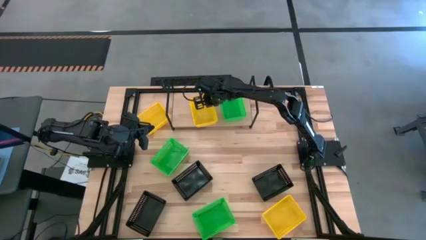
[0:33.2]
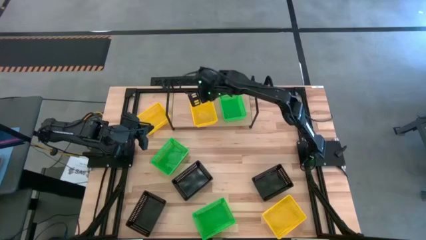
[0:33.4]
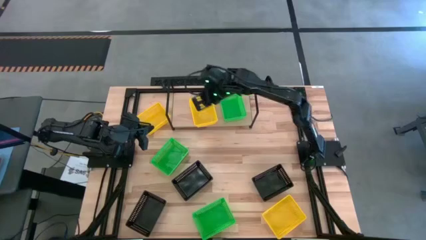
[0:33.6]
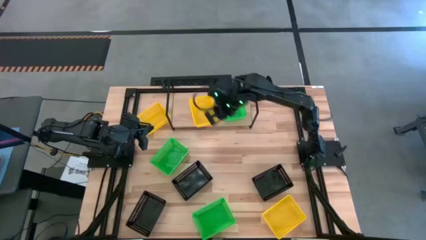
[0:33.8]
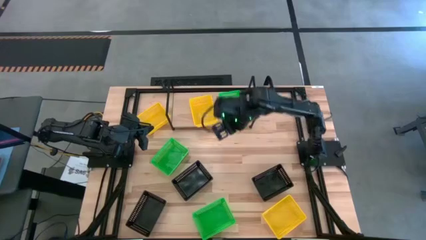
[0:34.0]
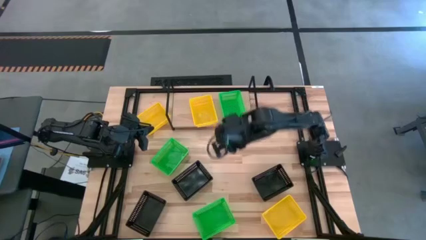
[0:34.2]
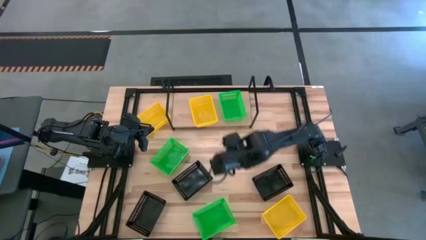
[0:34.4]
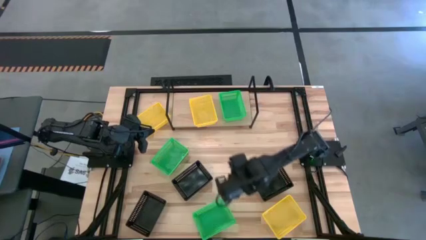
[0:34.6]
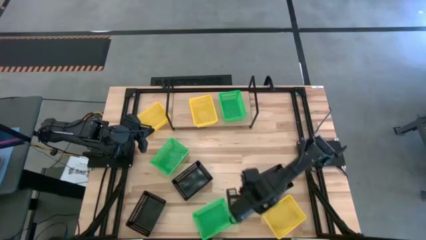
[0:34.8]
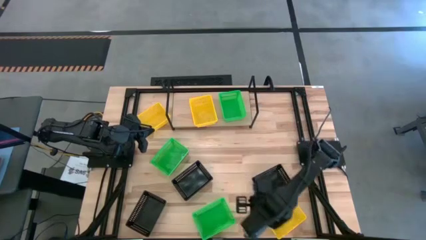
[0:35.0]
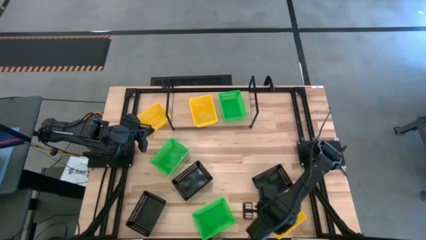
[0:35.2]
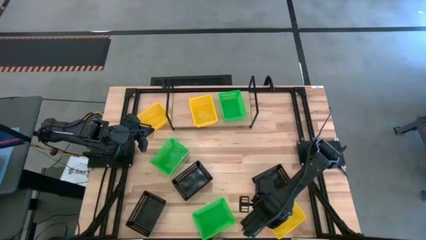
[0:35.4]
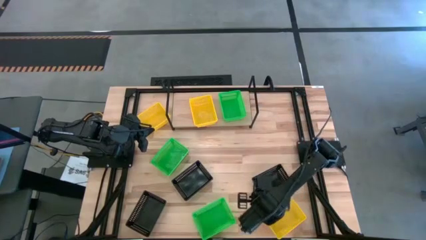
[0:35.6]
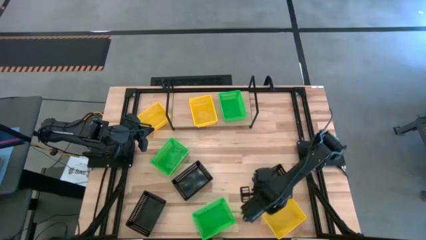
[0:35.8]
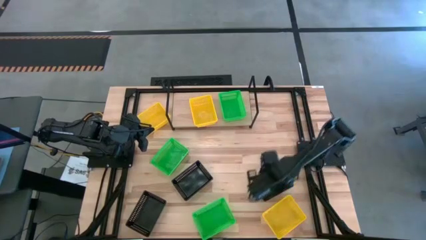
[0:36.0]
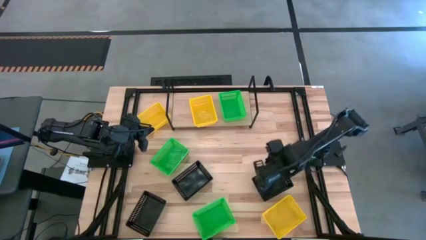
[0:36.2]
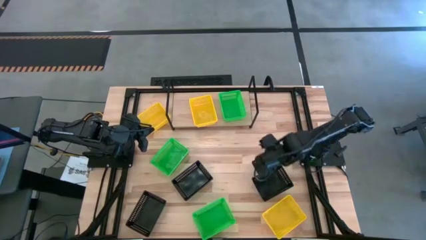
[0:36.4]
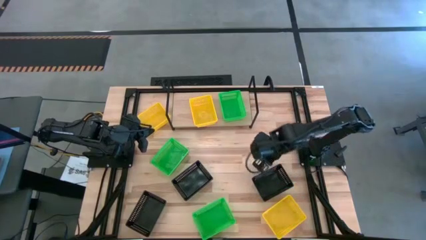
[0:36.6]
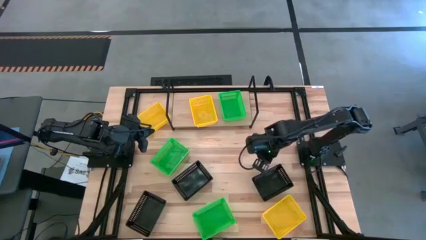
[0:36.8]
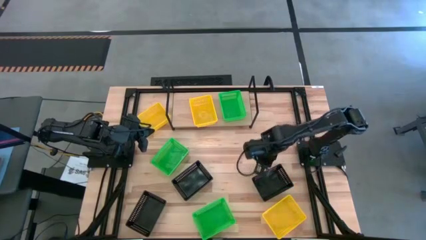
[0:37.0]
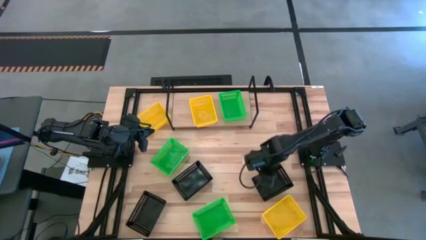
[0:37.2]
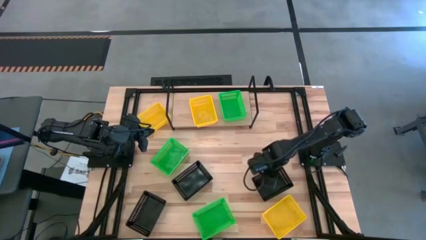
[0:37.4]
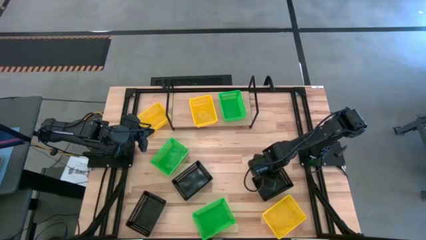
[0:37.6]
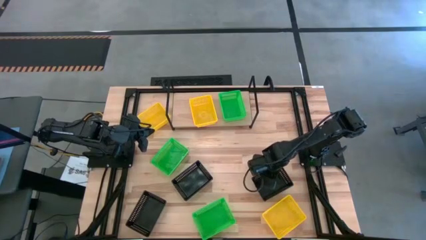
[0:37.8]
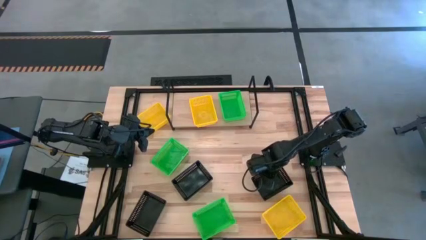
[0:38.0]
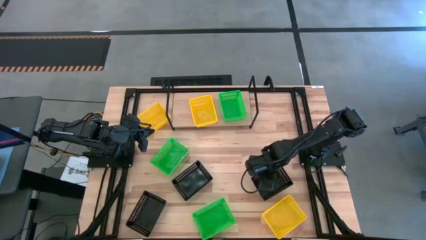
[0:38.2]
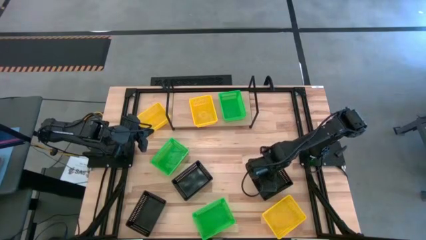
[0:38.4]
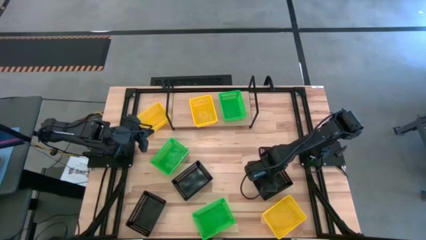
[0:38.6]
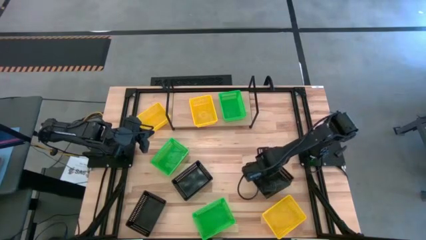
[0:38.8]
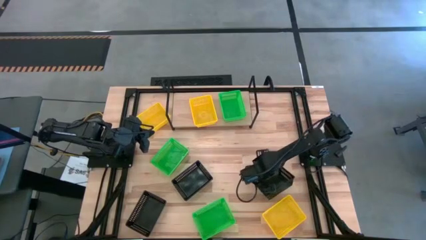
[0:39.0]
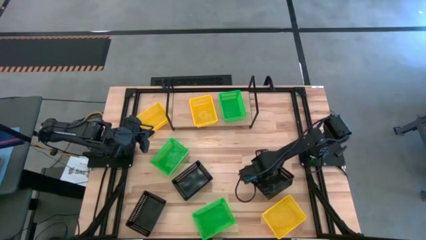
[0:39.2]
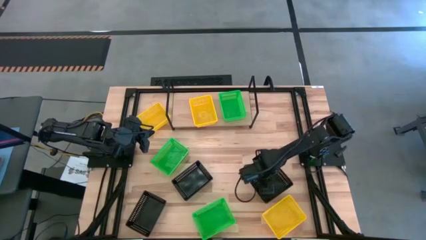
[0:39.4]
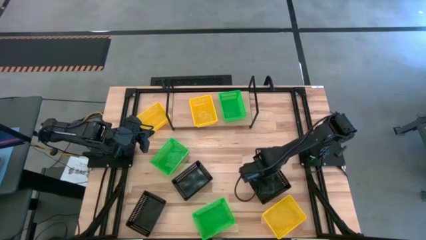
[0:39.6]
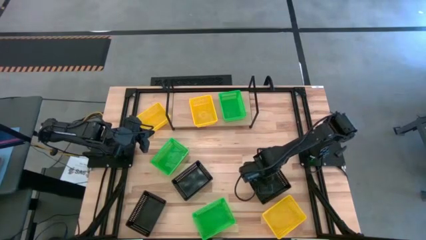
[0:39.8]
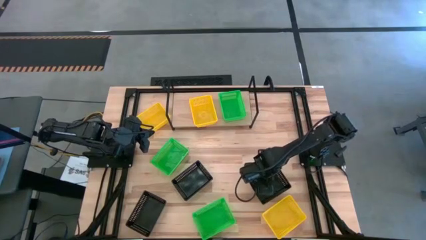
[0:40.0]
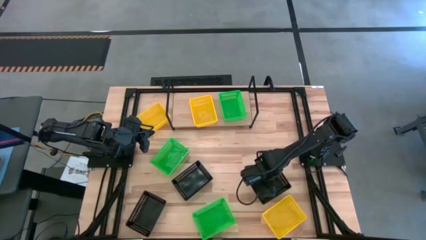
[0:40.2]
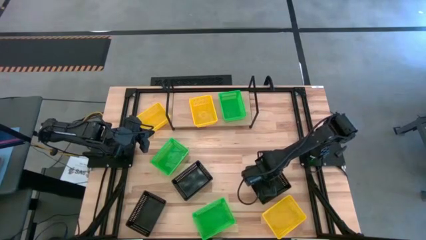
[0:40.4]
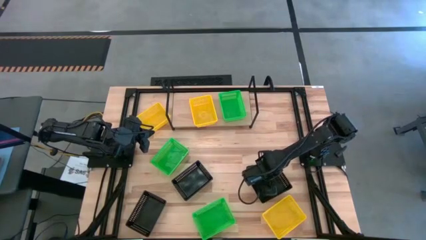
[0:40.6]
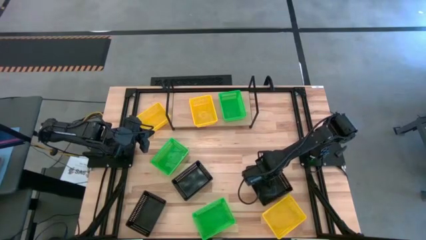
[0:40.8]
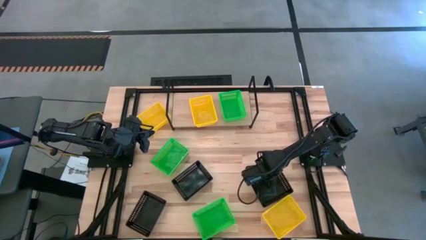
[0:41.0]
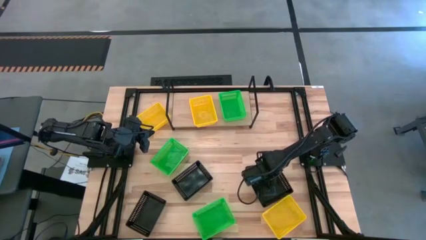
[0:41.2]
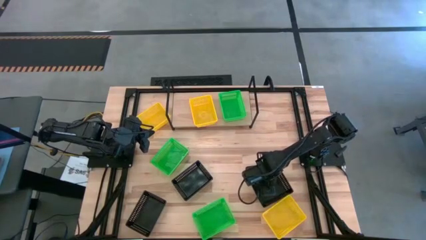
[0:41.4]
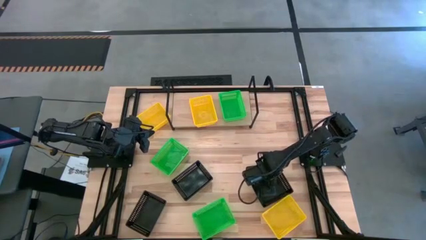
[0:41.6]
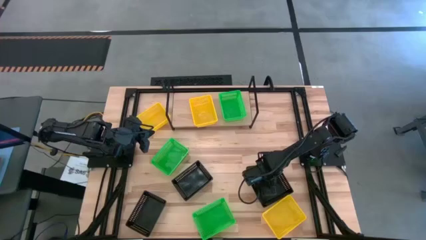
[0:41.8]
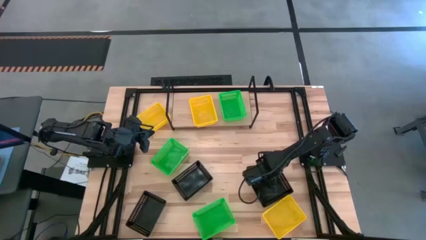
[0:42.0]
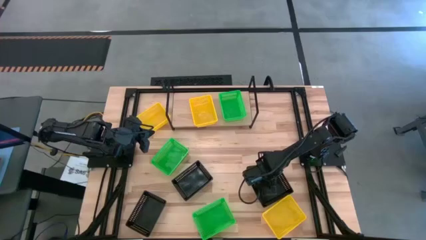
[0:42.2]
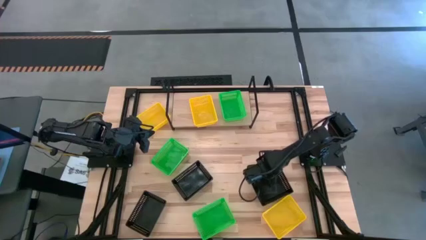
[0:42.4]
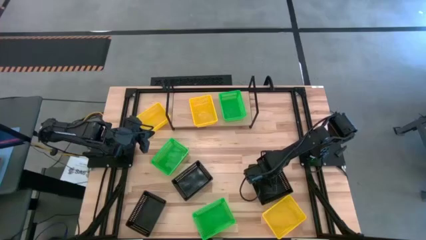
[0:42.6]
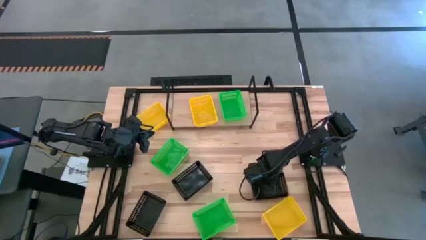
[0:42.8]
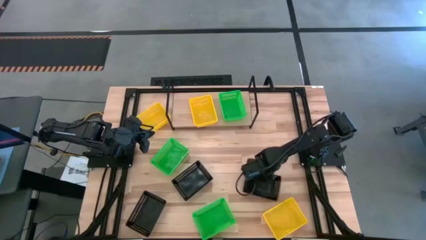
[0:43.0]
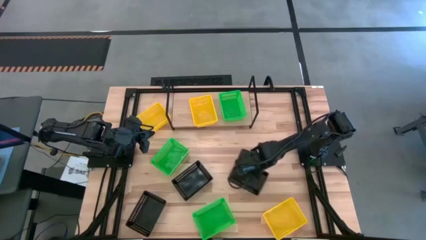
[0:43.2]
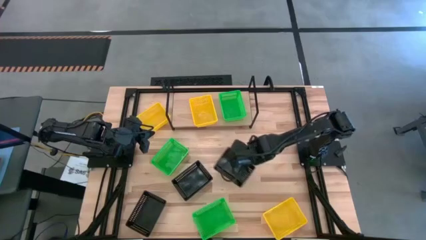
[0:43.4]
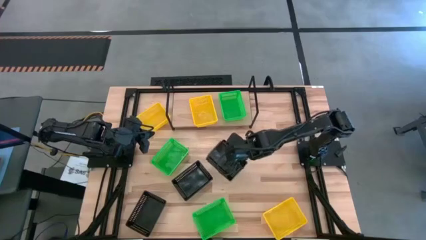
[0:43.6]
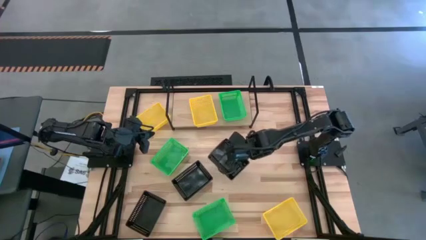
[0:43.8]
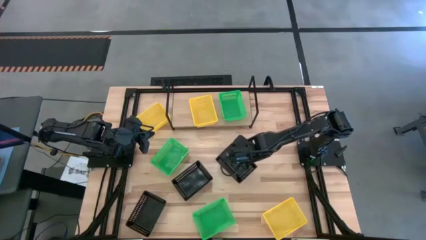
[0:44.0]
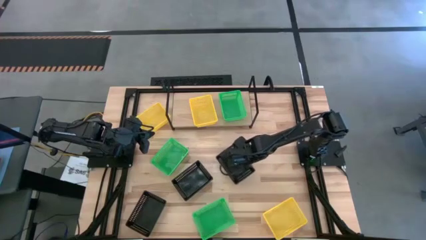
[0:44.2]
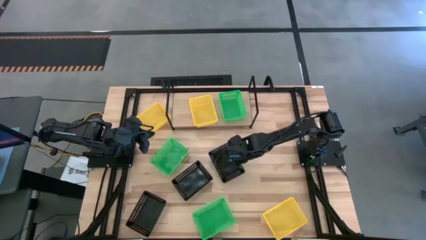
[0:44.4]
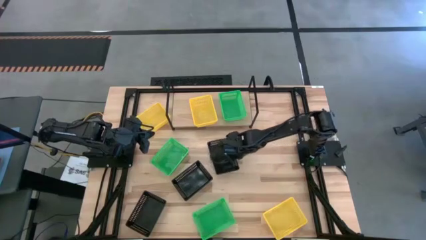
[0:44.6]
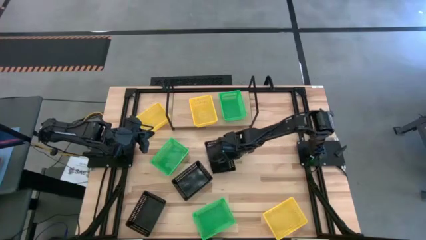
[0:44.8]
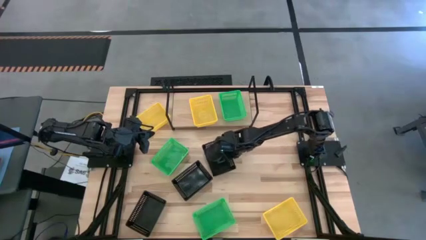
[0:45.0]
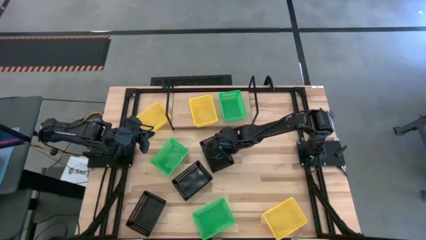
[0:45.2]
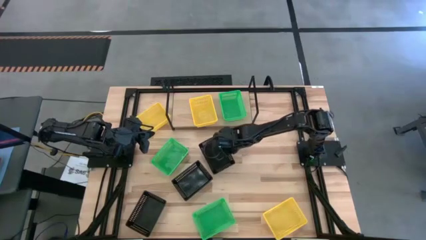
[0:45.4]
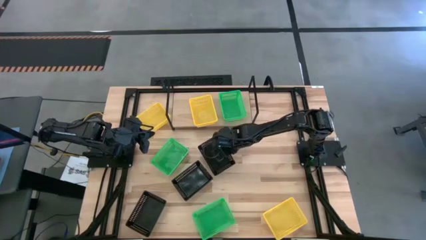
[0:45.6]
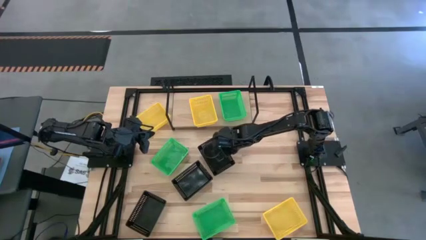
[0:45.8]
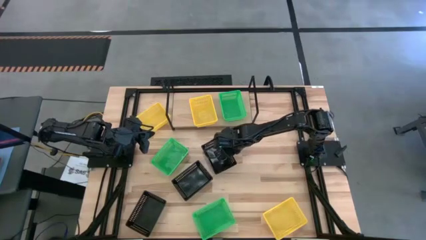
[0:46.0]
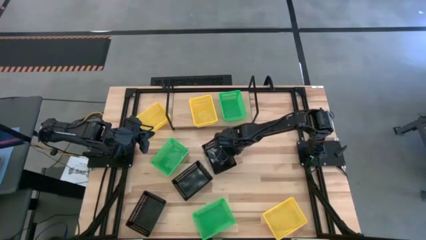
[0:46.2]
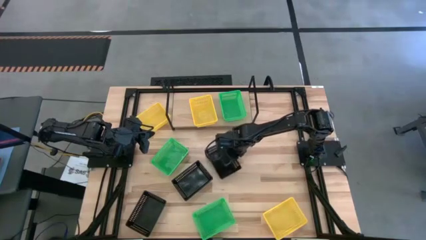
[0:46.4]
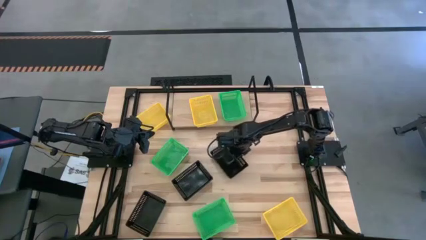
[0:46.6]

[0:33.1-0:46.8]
Task: Stack baskets on shelf by color
Move the top right black bin to the center of the table

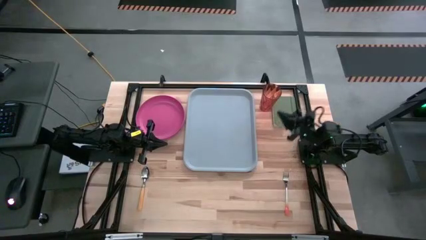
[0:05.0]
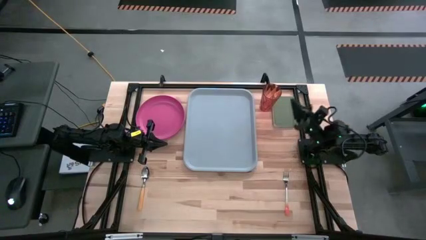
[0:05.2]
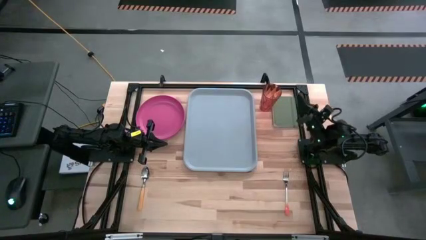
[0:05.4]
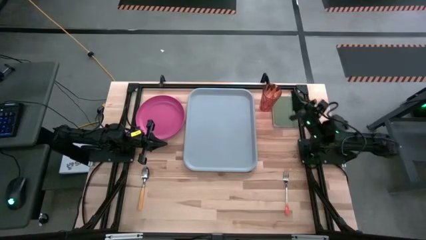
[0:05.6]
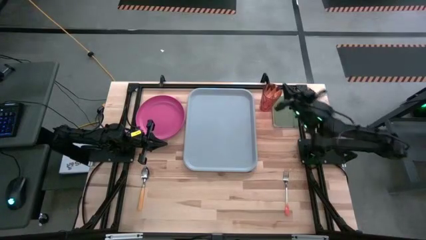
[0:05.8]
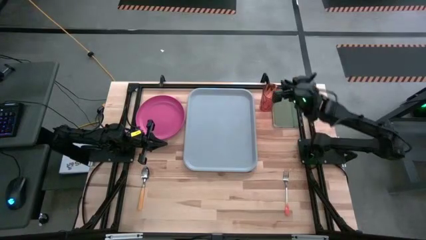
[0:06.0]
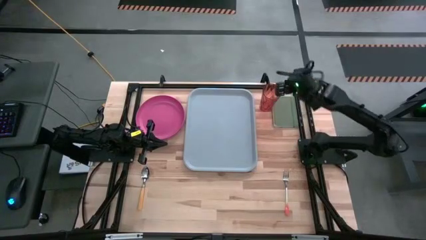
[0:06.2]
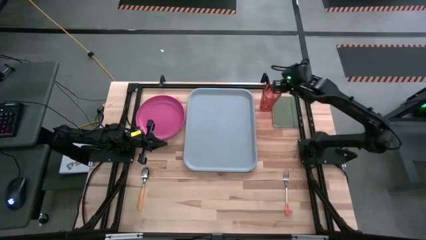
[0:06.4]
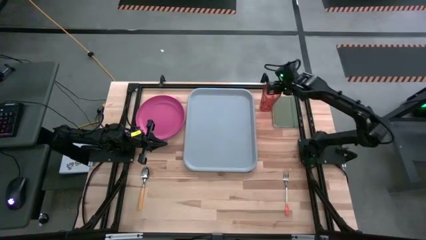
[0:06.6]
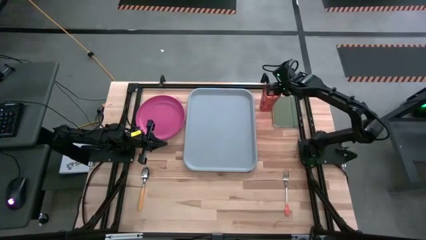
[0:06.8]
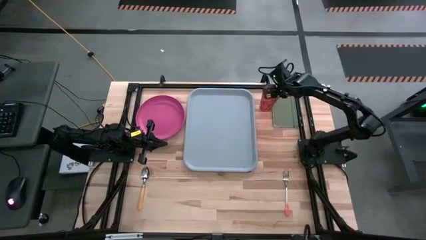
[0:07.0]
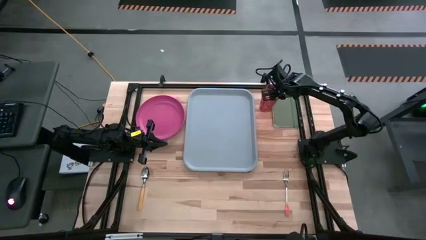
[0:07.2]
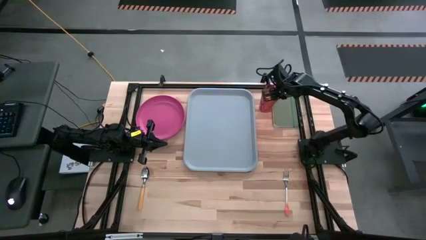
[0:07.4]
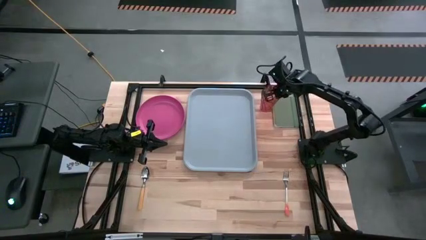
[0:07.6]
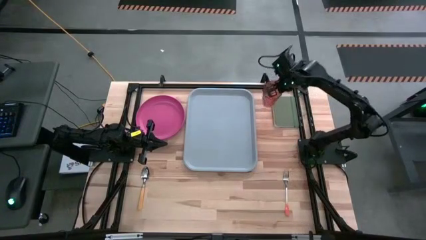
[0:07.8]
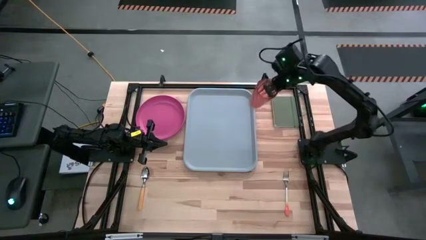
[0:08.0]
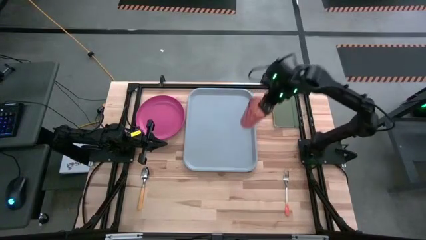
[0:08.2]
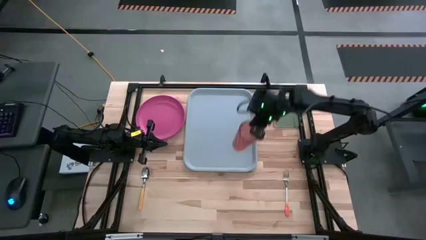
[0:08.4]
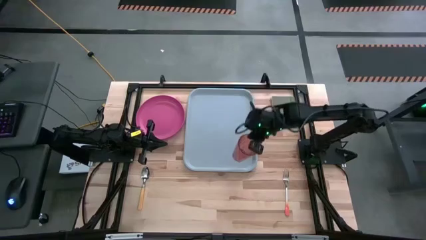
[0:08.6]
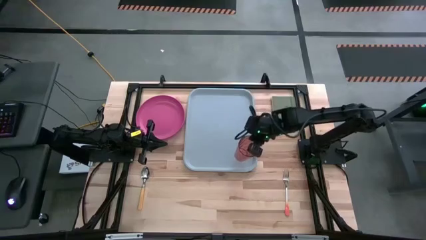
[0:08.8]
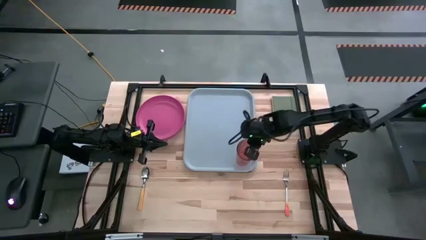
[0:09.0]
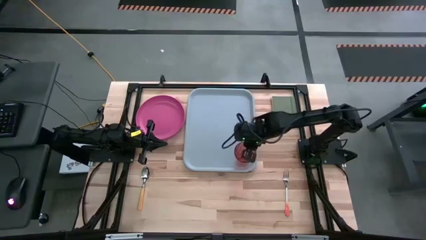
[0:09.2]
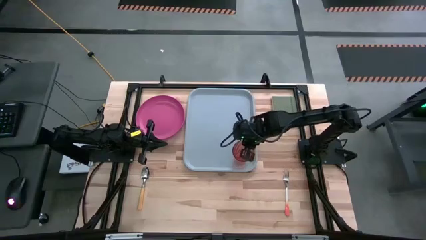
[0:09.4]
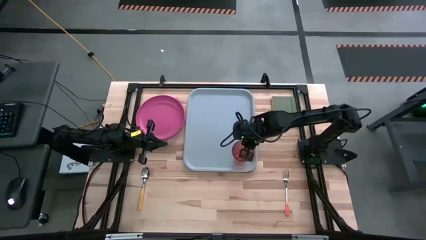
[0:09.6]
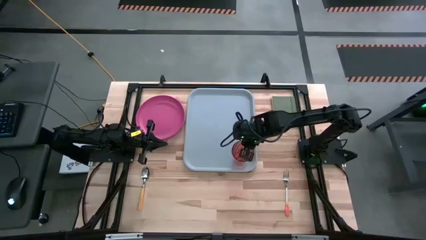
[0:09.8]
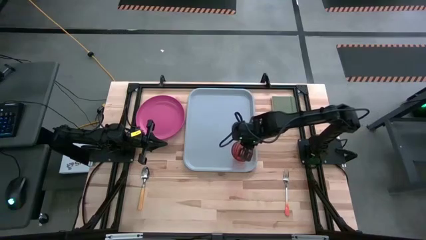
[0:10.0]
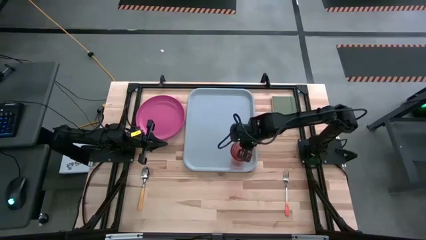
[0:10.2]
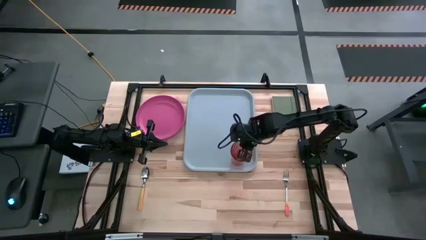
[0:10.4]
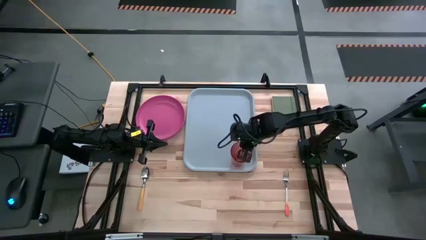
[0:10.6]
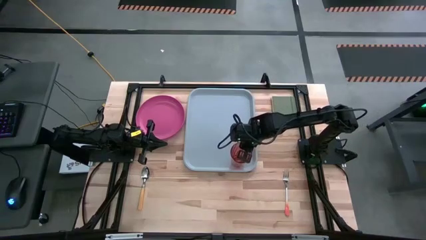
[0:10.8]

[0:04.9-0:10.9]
Task: Pick and place plate/cup/fork/spoon on tray
Put the orange glass on the bottom right of the gray serving tray
